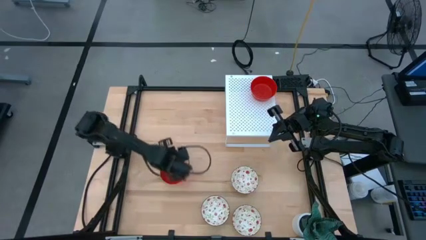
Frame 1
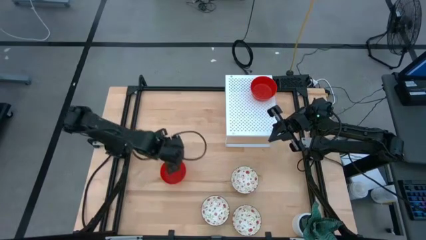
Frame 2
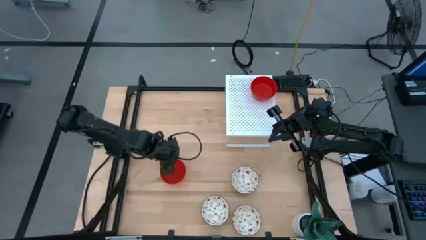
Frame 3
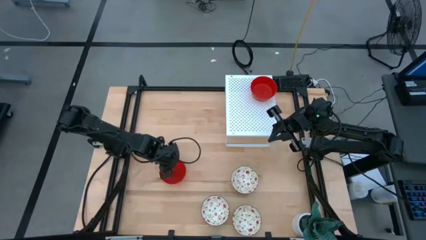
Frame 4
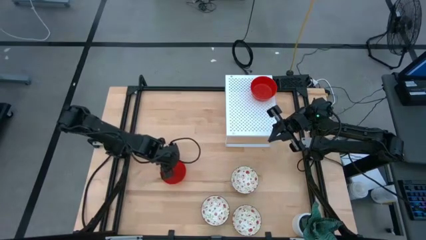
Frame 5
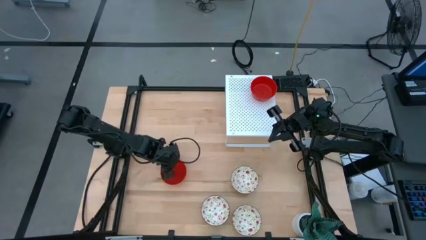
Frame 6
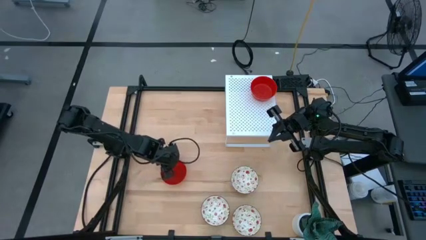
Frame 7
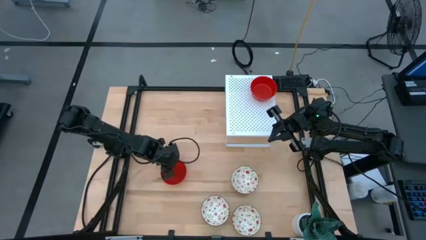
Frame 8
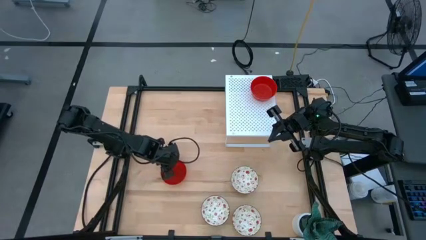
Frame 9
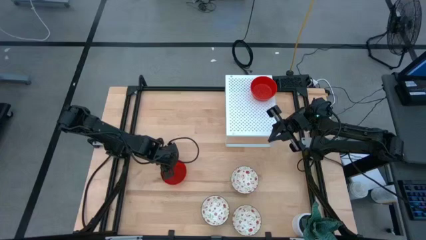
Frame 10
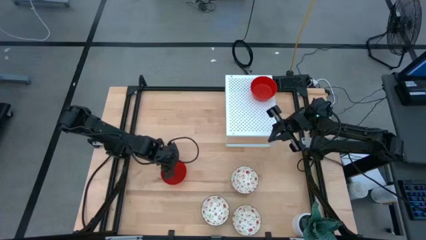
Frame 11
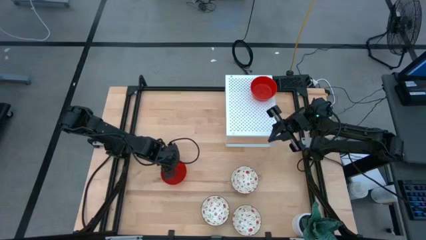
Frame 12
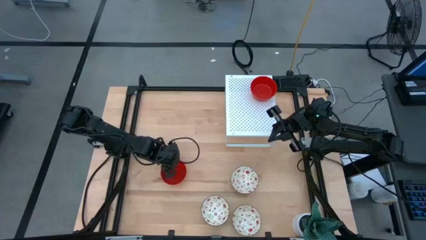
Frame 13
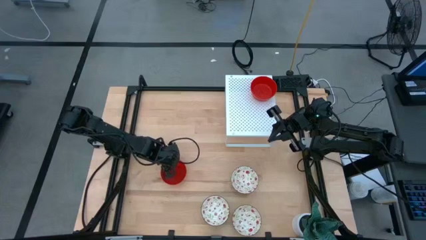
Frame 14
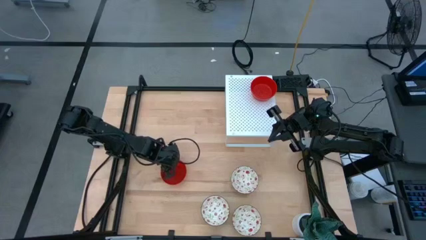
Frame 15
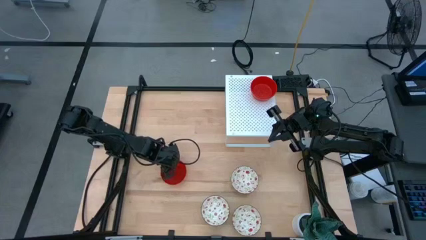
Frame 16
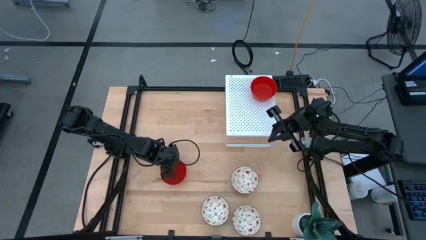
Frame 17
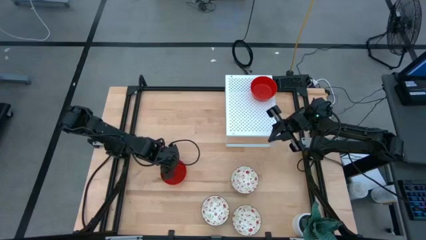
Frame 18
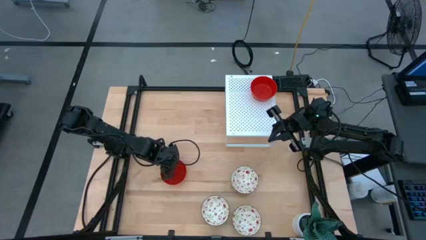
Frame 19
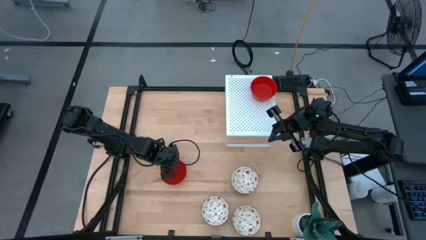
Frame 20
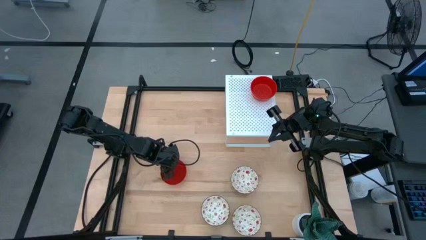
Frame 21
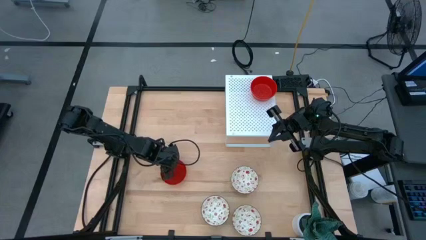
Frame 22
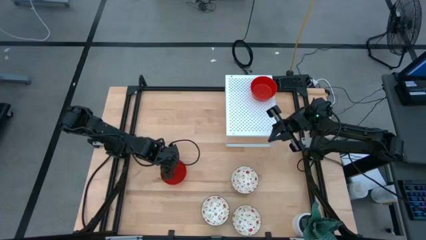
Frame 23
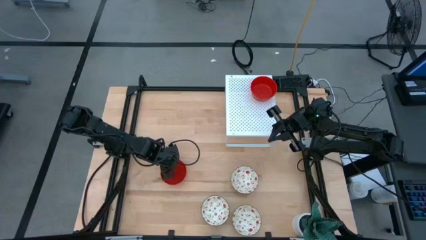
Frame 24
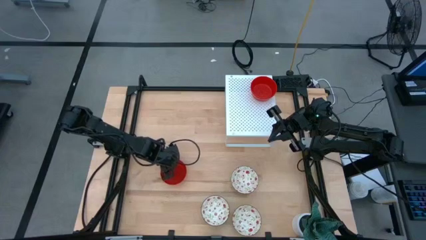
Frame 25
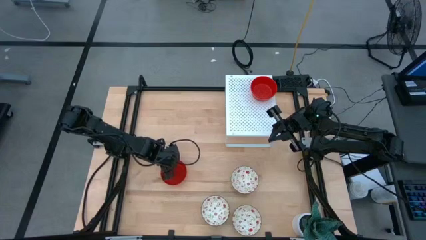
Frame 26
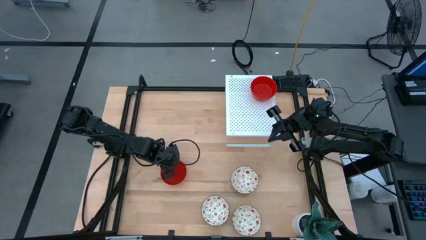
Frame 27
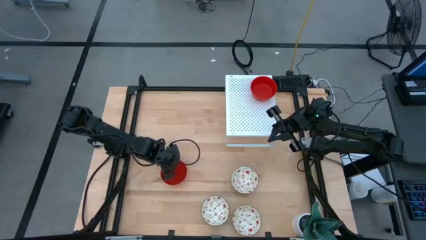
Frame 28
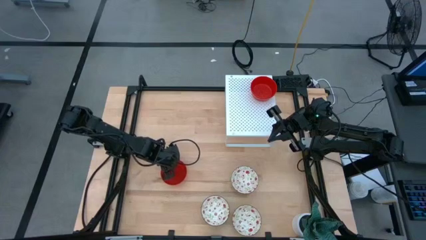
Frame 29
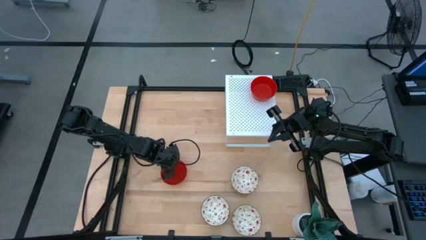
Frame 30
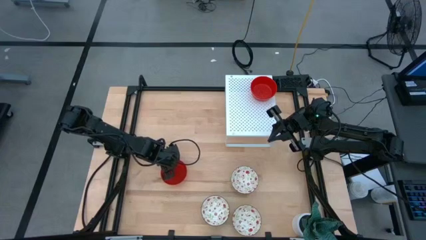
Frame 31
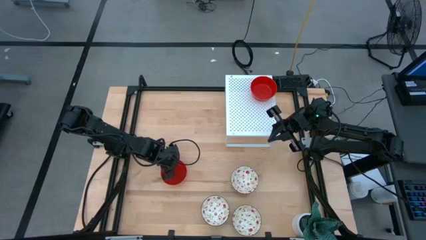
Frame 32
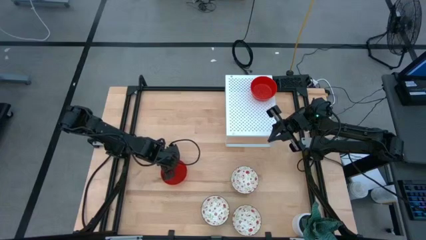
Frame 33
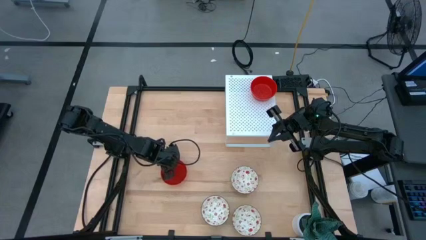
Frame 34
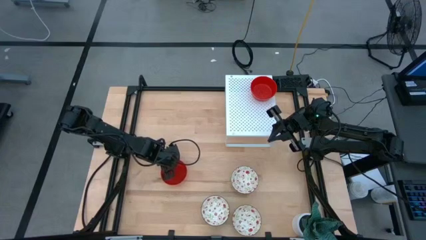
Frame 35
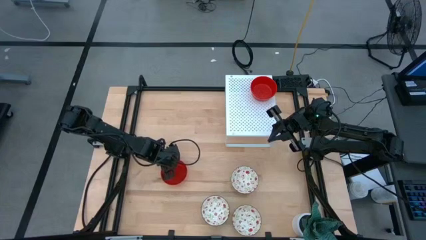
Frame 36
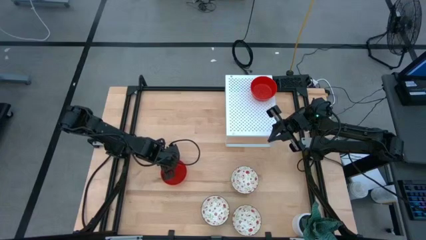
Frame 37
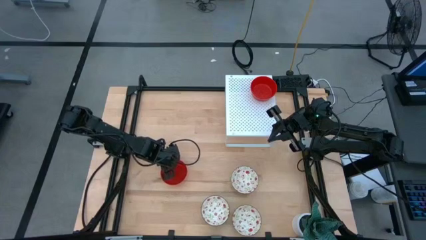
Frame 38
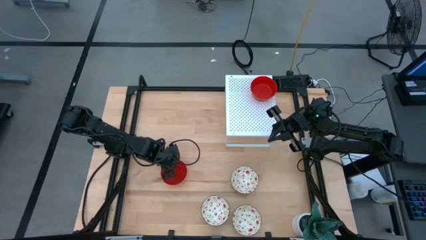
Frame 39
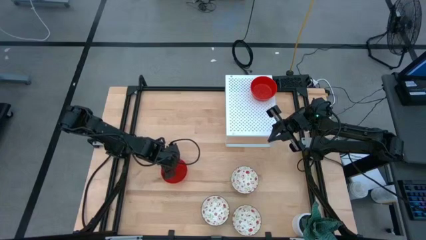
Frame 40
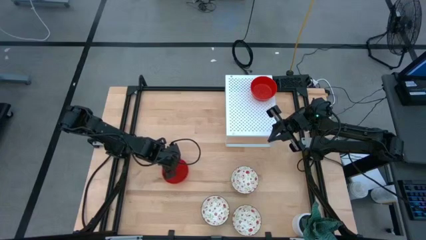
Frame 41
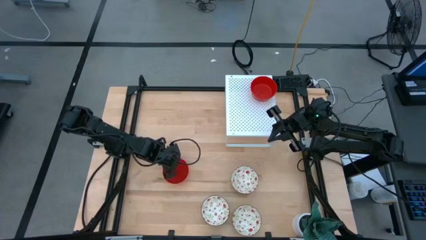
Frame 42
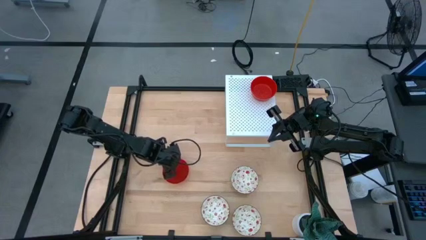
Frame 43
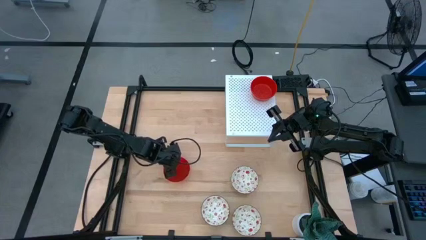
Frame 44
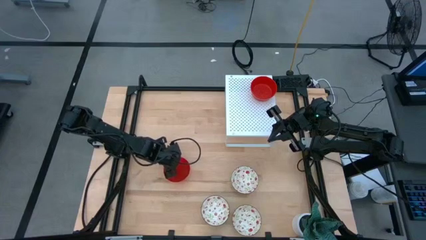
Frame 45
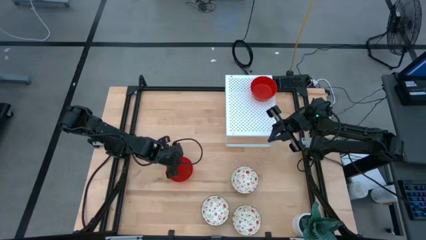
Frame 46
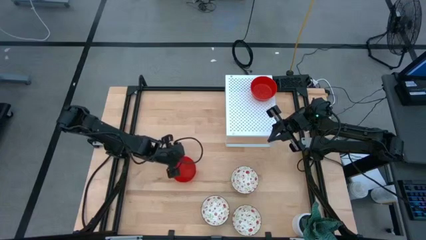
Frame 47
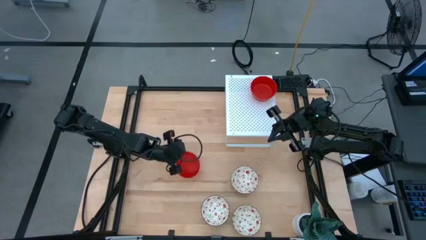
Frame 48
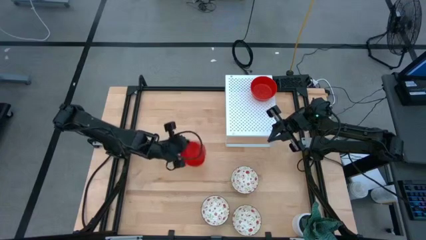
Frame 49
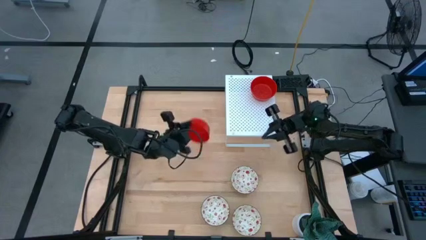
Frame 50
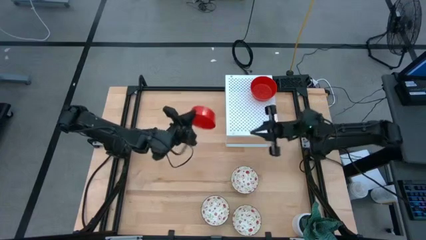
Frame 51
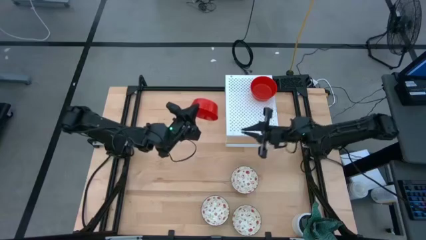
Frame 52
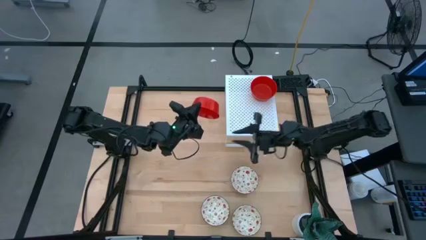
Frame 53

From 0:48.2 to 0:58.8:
Task: Pick & Place Mini bowls
Stack the red bowl on the red bowl on the shelf
